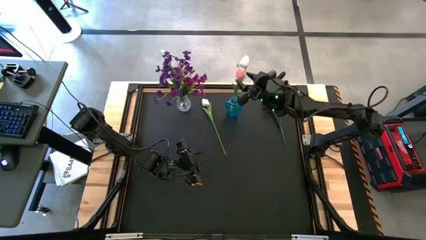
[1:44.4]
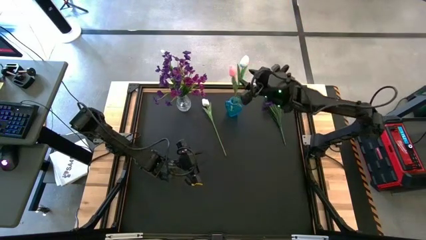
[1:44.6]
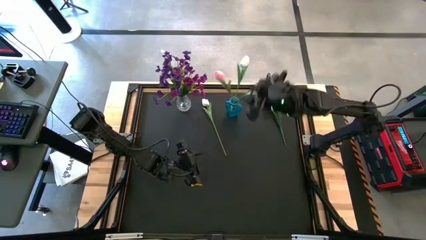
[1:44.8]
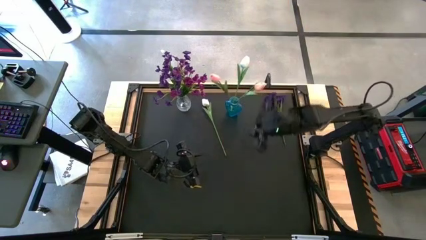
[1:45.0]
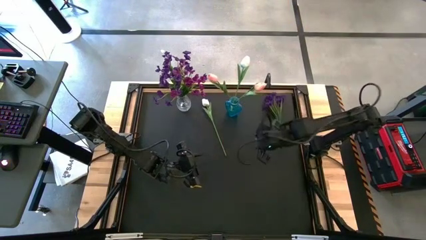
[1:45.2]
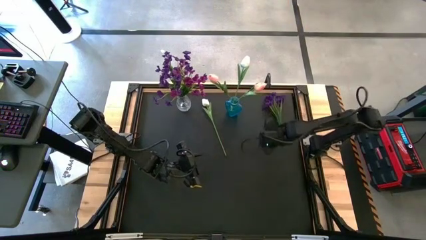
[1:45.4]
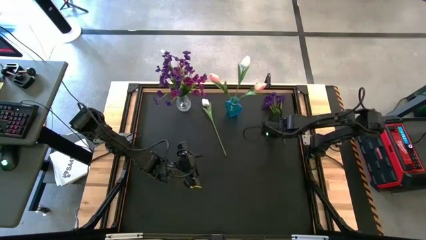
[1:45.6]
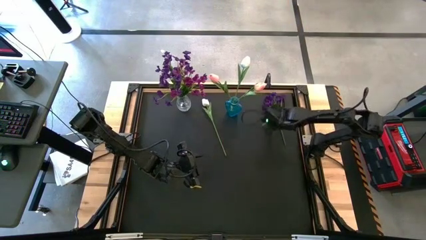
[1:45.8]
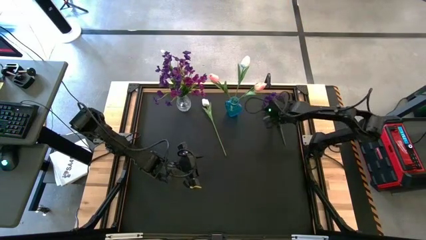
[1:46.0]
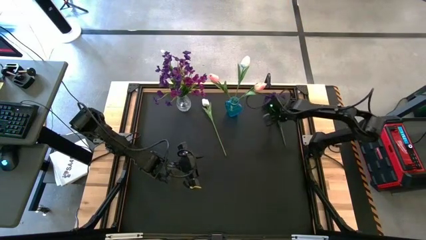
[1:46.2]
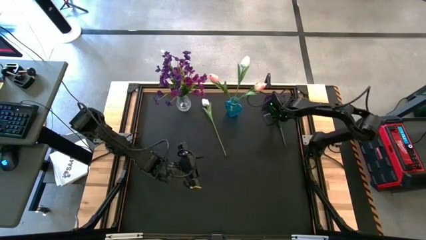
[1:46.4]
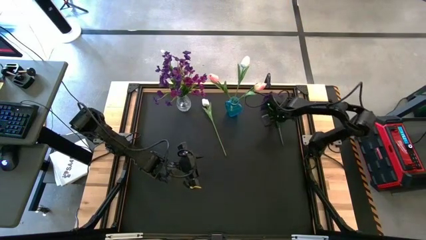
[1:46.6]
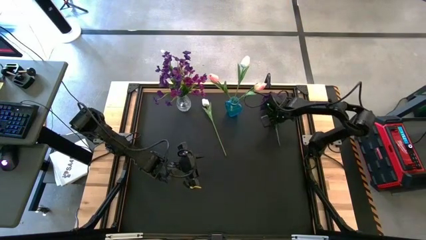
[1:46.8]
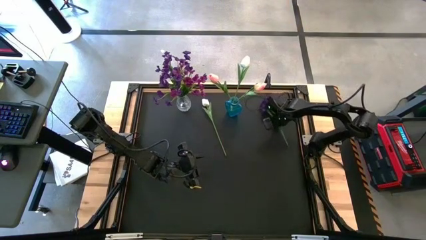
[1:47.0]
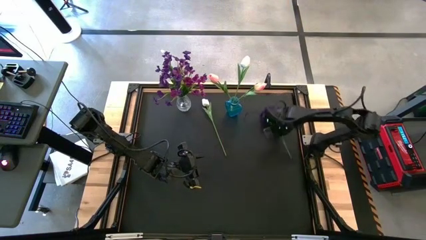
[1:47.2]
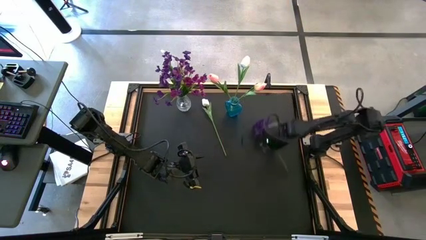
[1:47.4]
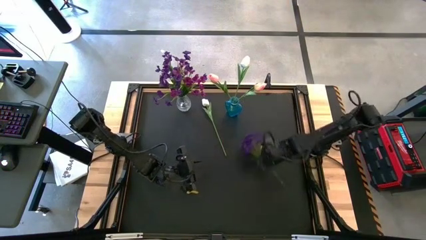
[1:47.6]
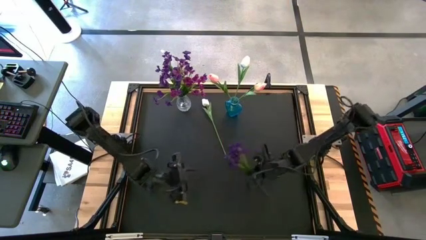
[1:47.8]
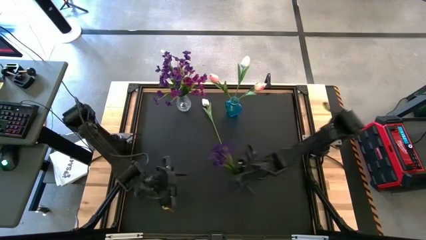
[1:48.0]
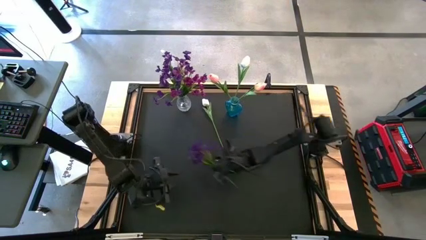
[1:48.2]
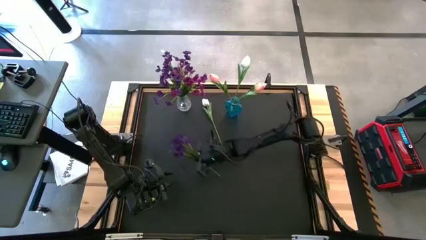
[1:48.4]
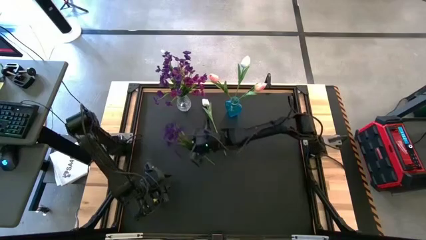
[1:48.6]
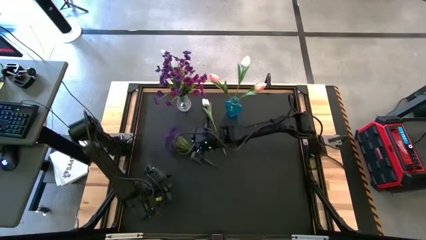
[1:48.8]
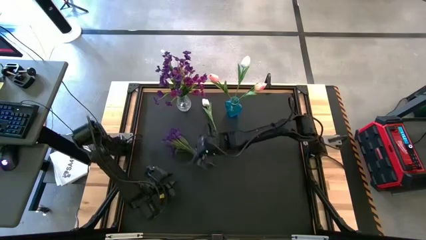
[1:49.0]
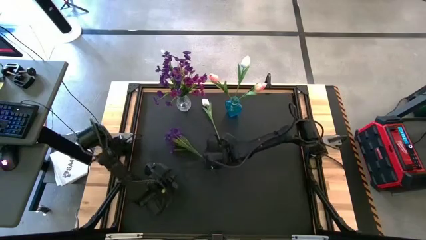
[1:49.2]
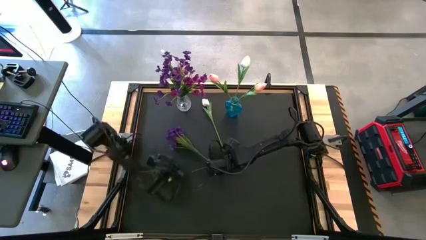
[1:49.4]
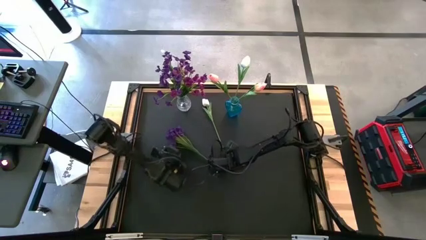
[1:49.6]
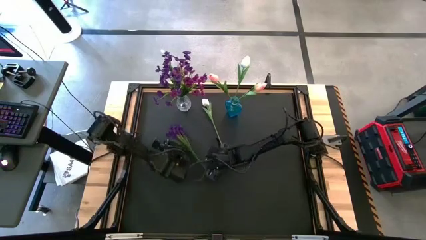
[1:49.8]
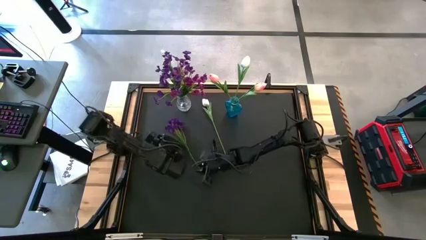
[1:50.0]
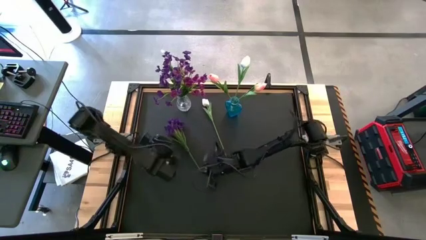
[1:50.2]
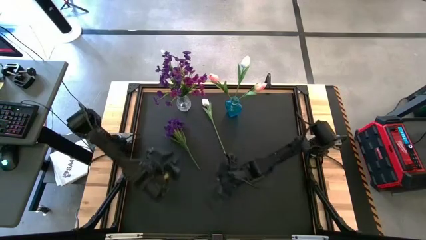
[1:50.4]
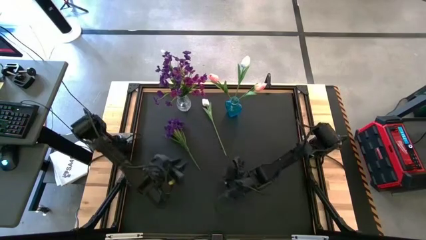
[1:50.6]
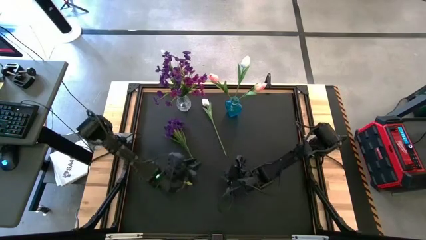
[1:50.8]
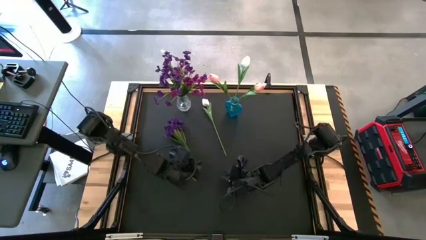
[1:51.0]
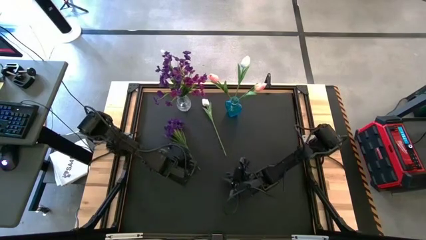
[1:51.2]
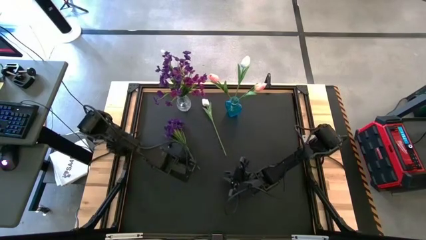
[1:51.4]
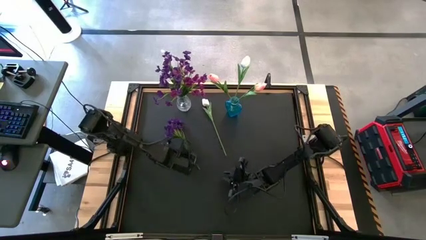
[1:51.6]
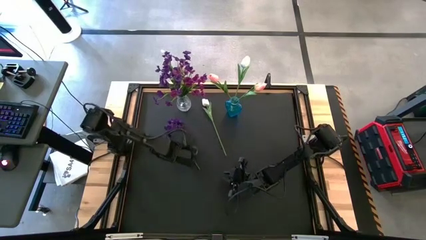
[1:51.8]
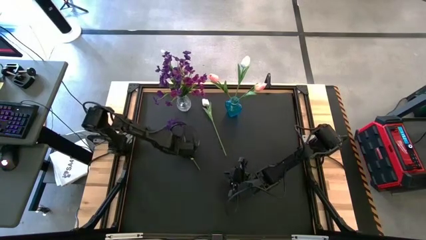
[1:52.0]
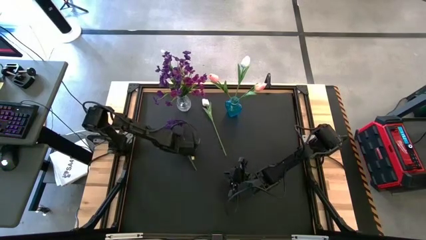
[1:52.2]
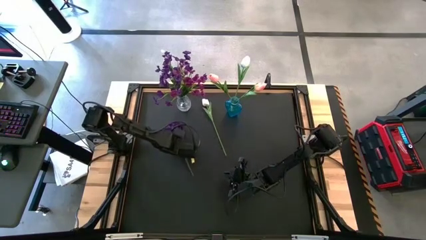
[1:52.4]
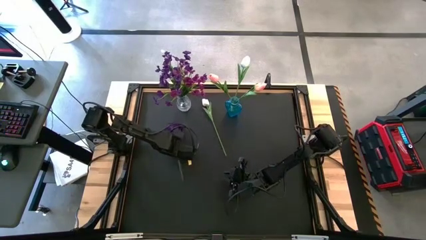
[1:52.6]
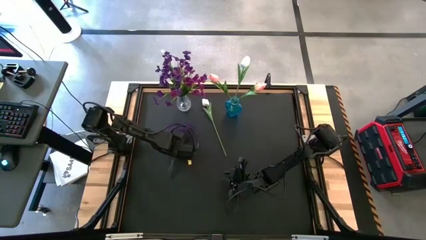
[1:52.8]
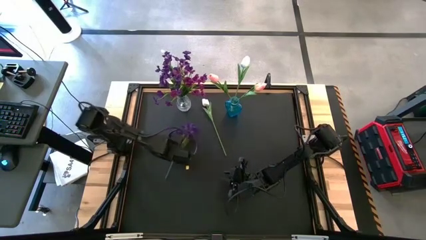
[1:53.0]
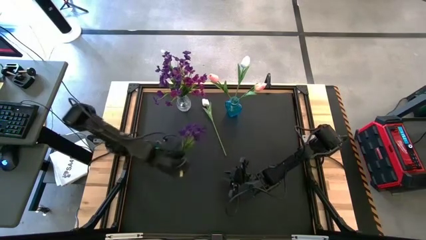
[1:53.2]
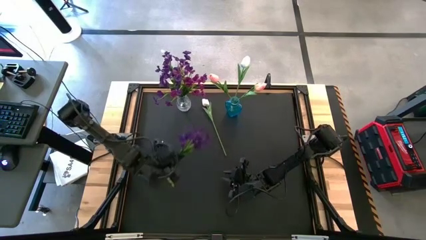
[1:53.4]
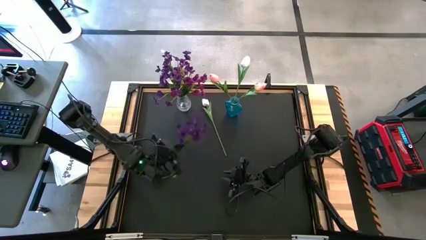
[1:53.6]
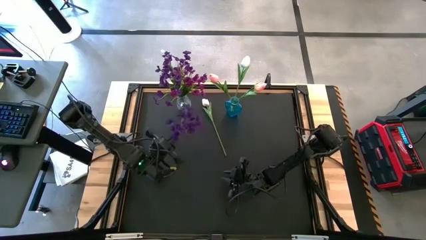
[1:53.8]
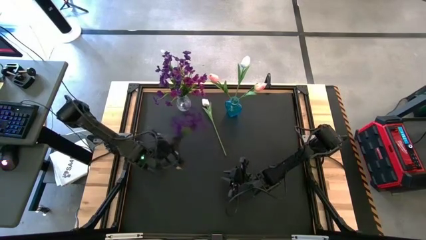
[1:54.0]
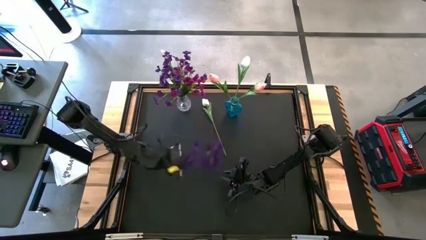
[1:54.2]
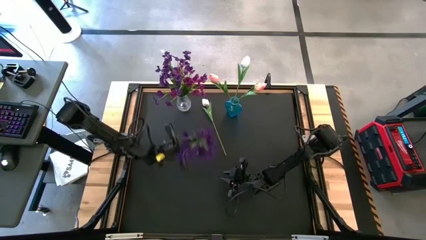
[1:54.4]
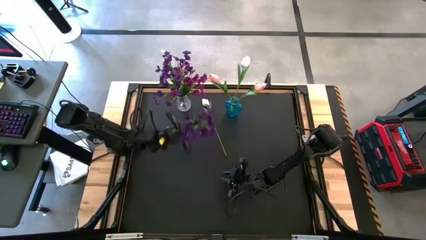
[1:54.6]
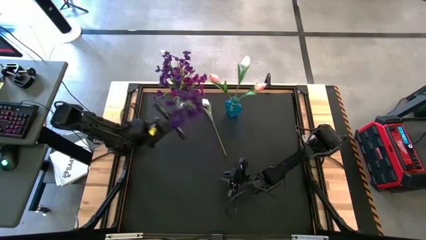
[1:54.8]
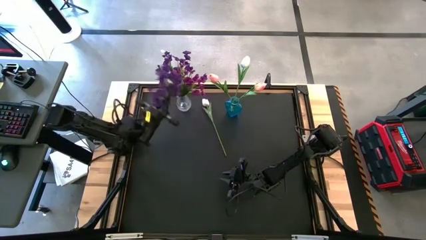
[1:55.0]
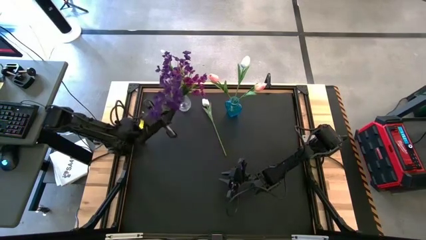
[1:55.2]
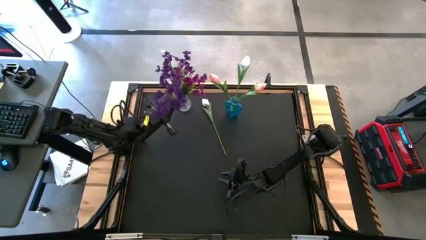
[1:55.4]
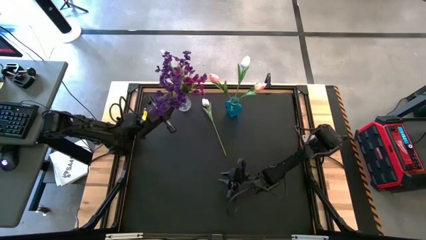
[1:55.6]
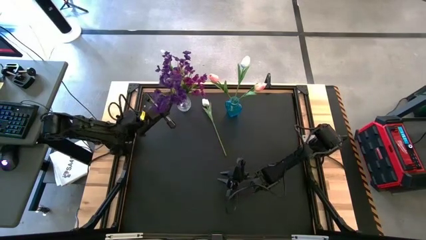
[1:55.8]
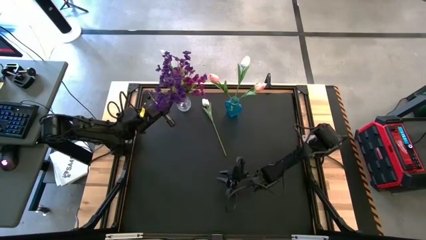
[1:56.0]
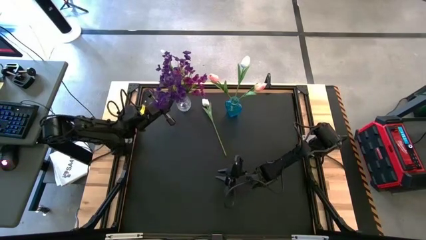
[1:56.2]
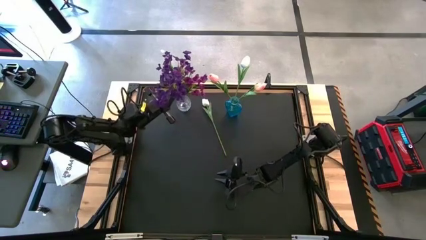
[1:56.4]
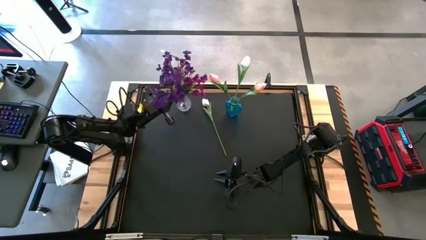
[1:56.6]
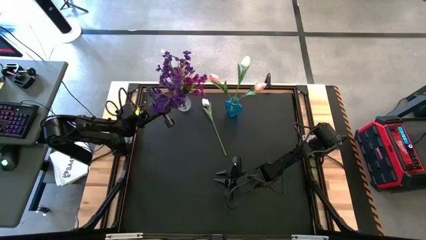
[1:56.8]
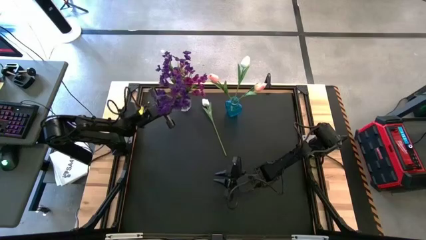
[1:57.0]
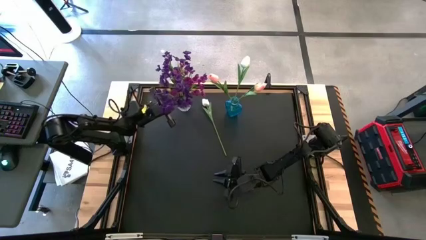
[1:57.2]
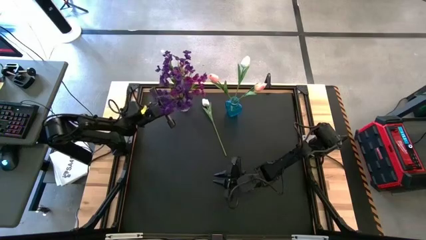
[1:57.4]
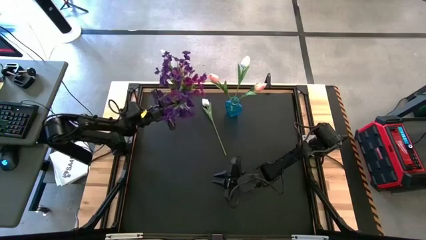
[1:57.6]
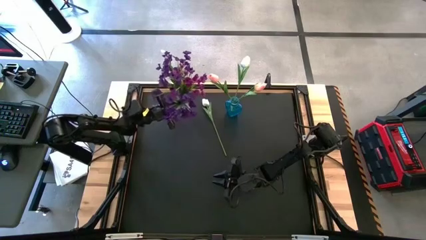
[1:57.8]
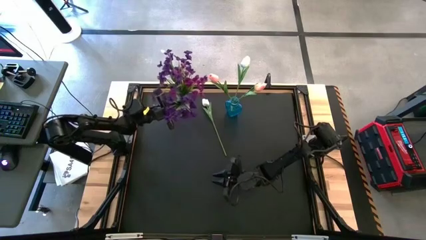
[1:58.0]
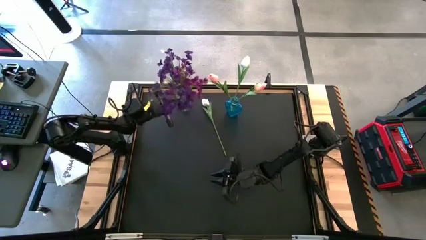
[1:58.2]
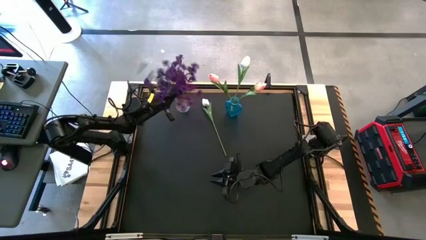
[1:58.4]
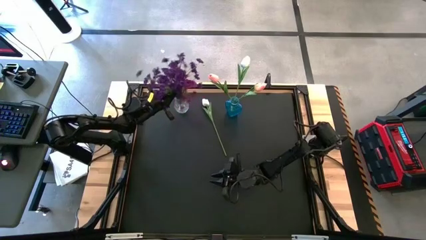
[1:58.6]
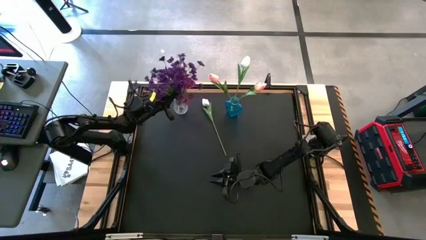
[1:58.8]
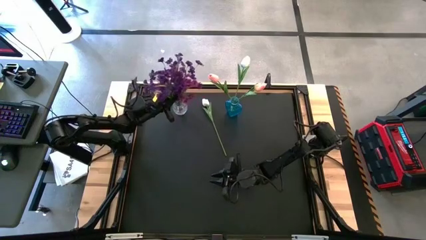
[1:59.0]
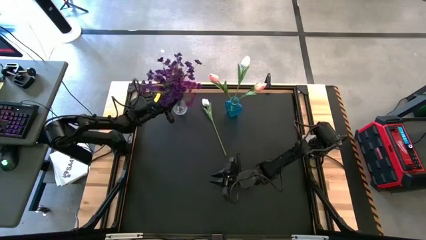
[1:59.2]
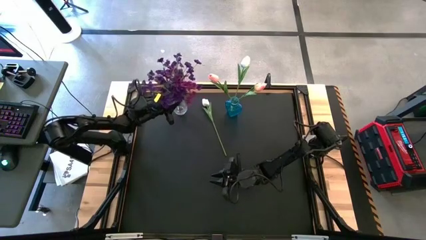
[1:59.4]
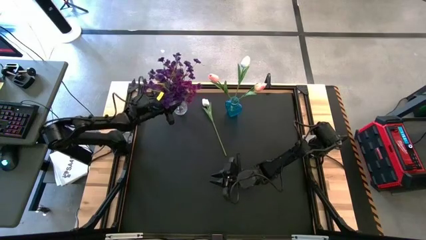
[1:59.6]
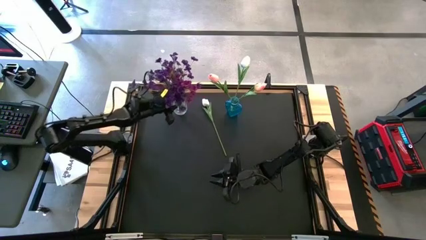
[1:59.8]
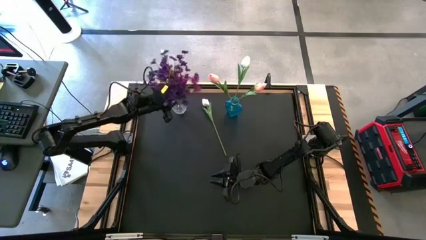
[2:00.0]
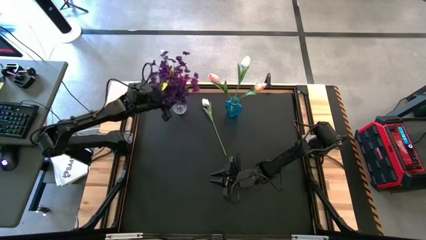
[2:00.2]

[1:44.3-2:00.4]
Task: Sort flowers into vase by color
Put the purple flowers into the transparent vase

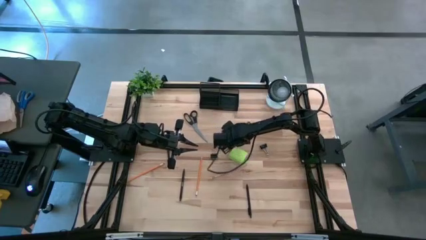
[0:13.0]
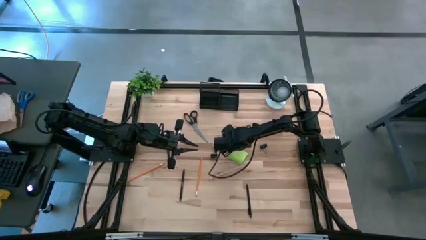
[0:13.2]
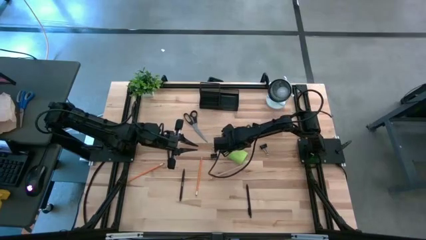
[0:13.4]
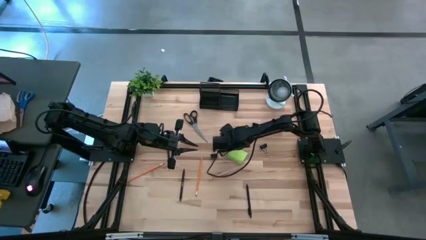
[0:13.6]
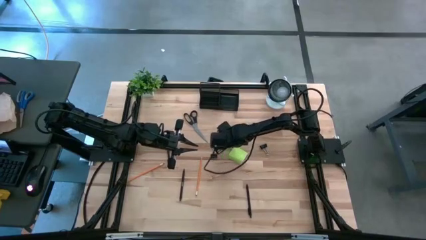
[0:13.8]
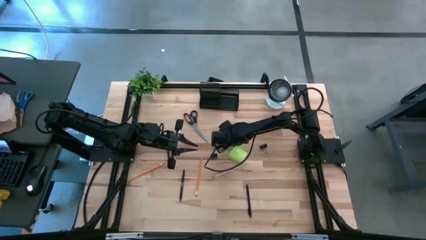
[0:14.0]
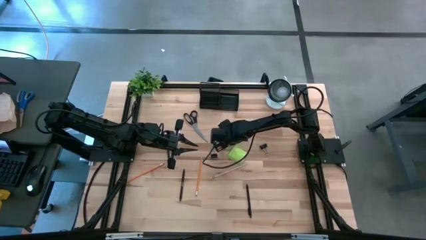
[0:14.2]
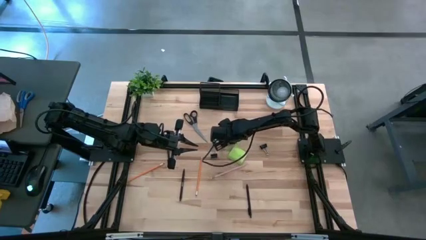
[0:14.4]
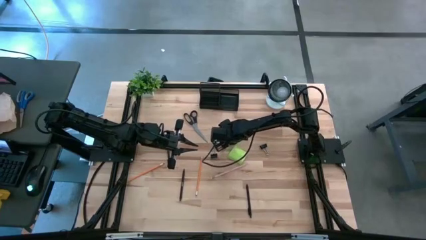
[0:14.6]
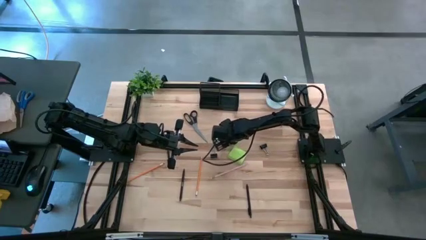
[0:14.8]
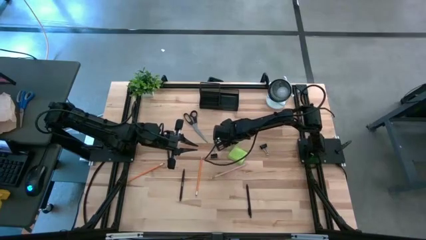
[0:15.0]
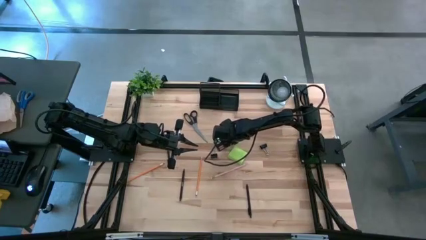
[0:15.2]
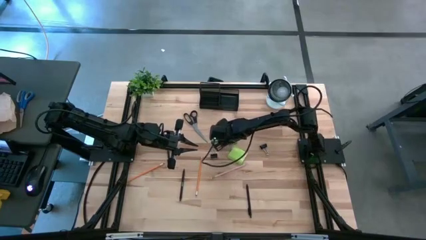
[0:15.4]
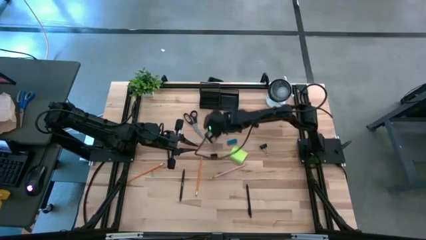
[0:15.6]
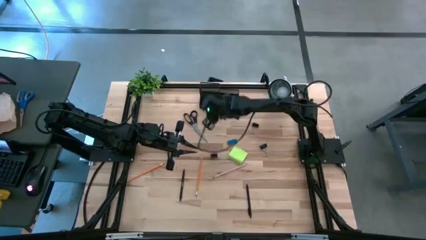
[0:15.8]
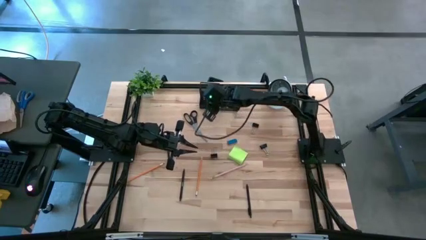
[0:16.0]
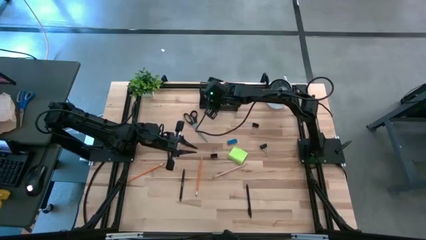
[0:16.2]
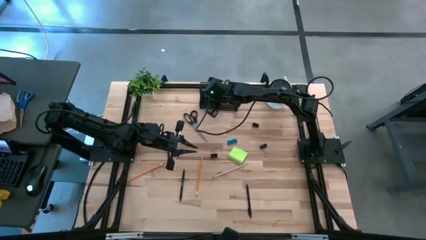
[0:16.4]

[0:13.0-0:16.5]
Task: Pick and place office supplies into organizer
Put the black binder clip into the black desk organizer
